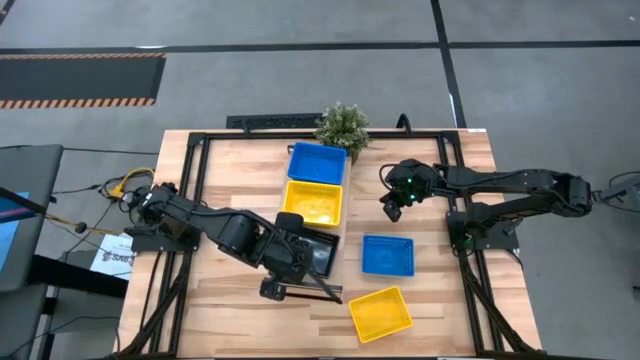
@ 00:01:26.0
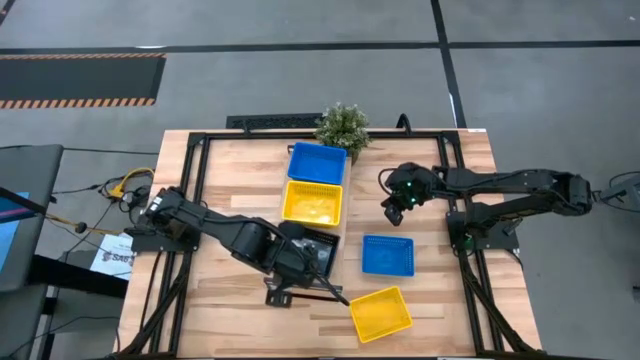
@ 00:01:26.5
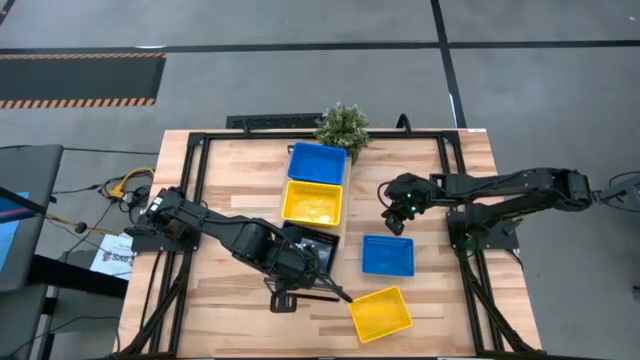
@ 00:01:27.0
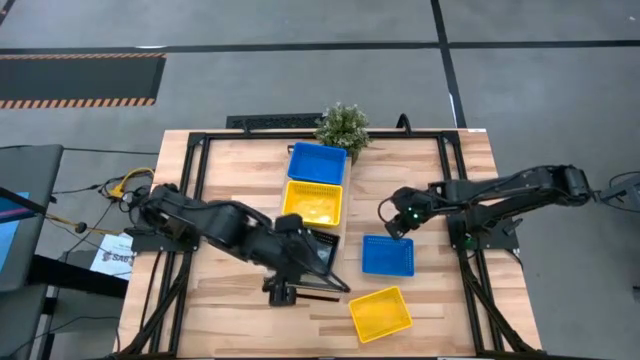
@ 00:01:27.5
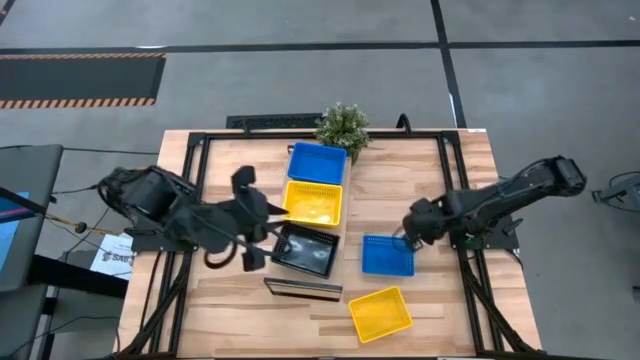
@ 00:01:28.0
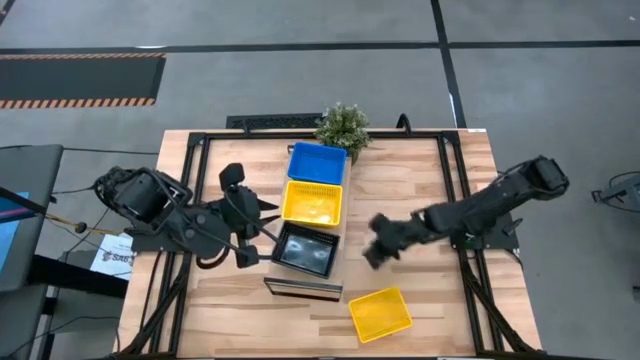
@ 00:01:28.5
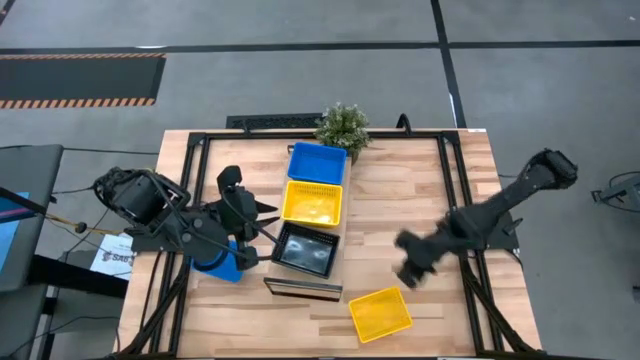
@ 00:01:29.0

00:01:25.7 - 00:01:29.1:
Task: Stack baskets on shelf by color
Move the blue basket to the left side of the table

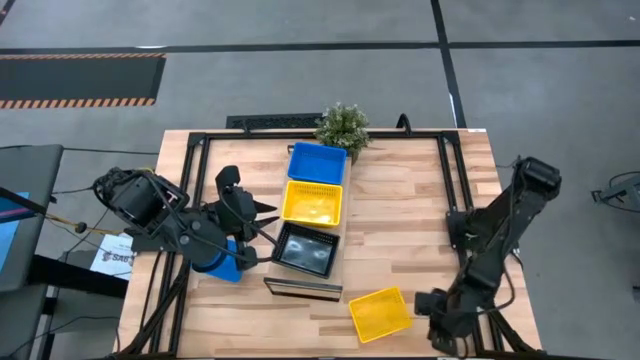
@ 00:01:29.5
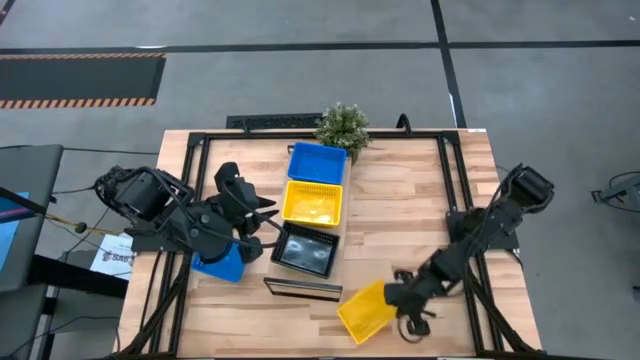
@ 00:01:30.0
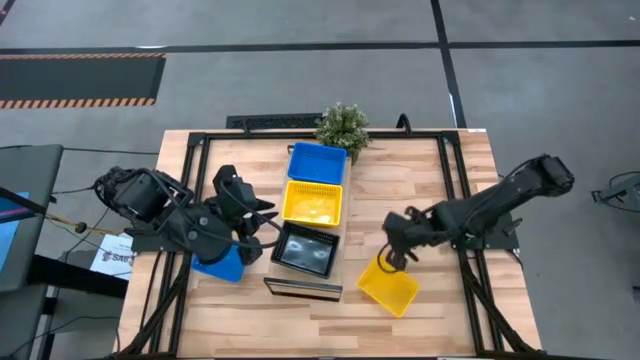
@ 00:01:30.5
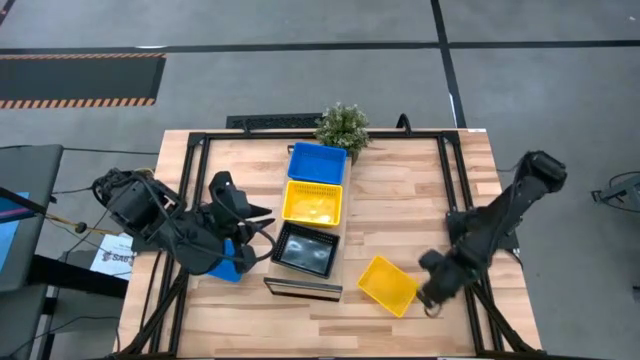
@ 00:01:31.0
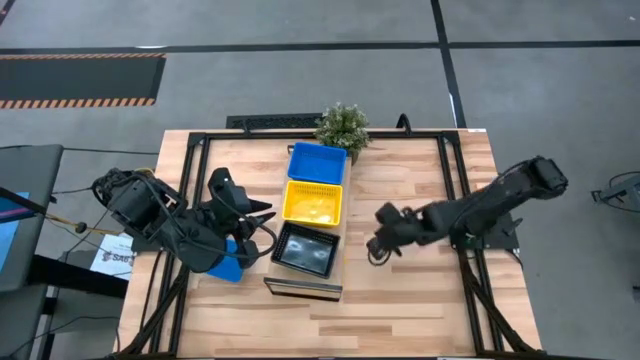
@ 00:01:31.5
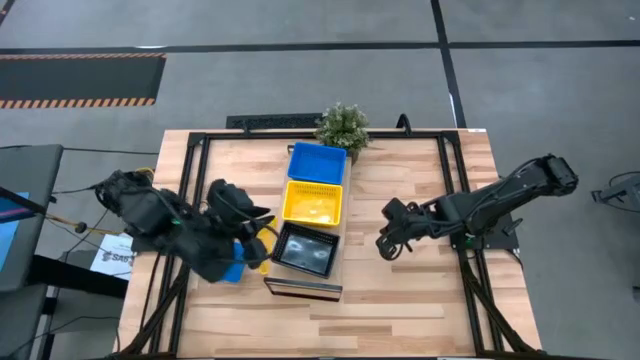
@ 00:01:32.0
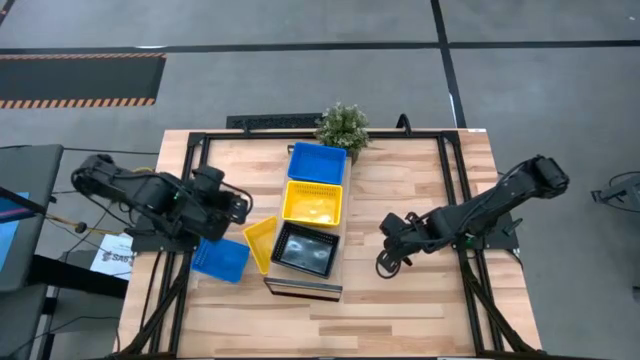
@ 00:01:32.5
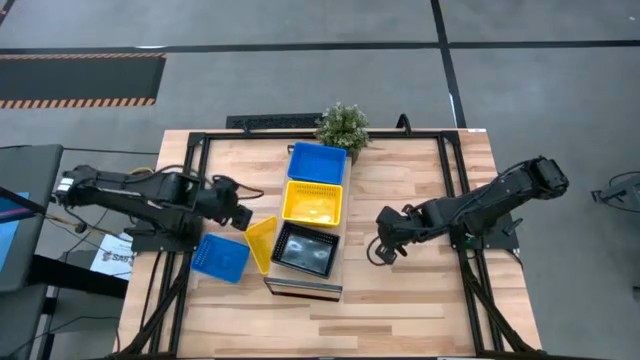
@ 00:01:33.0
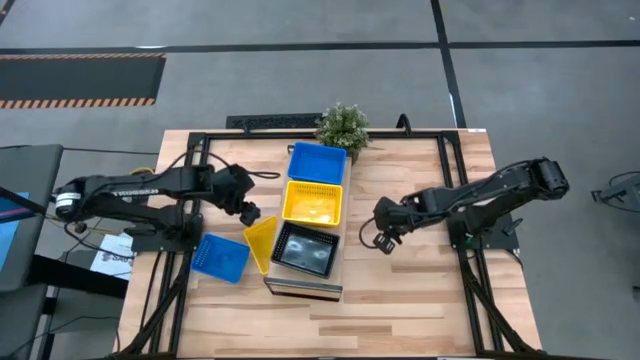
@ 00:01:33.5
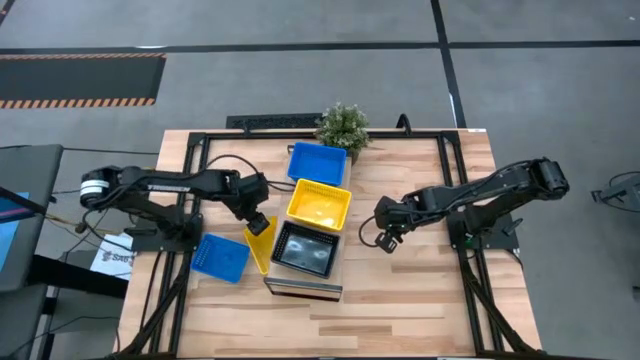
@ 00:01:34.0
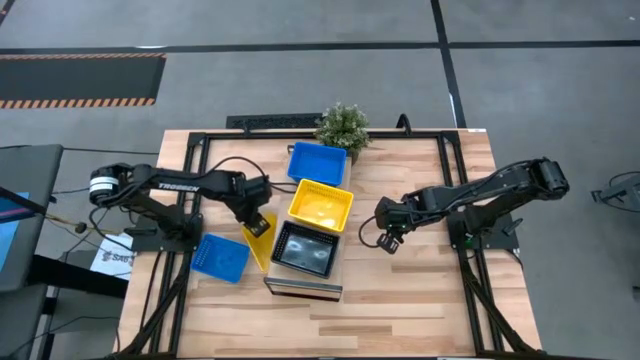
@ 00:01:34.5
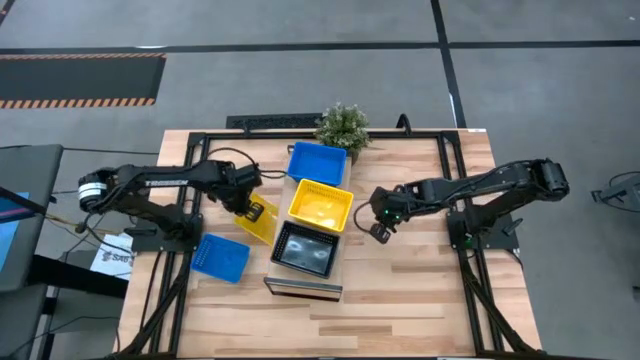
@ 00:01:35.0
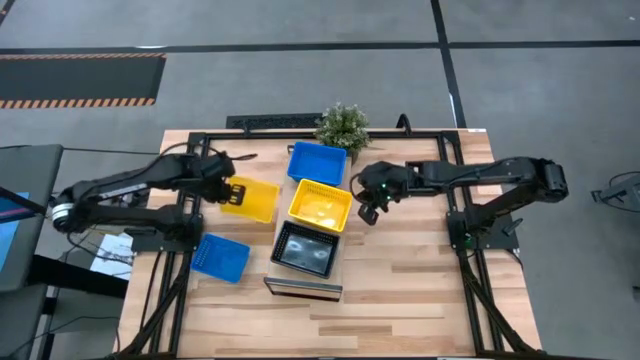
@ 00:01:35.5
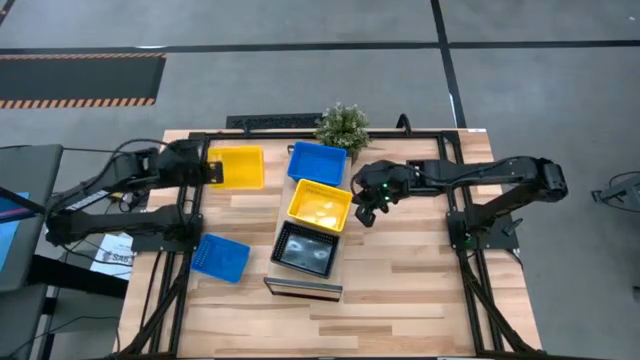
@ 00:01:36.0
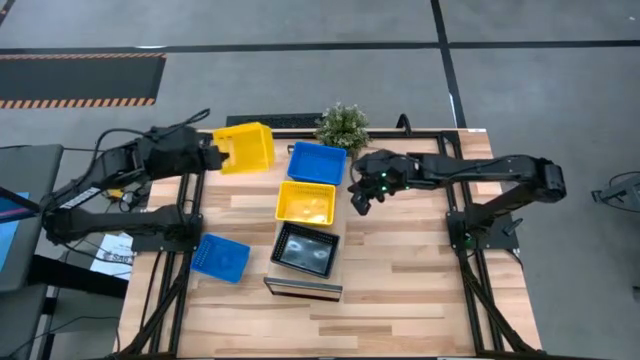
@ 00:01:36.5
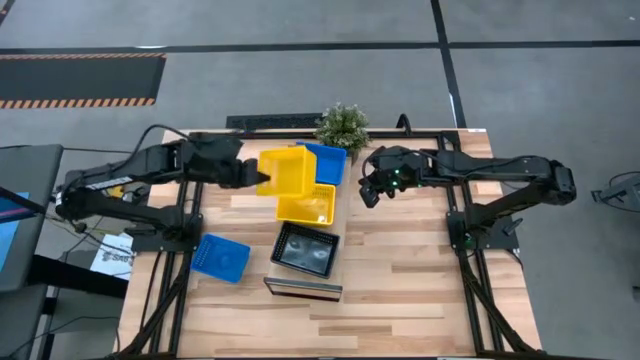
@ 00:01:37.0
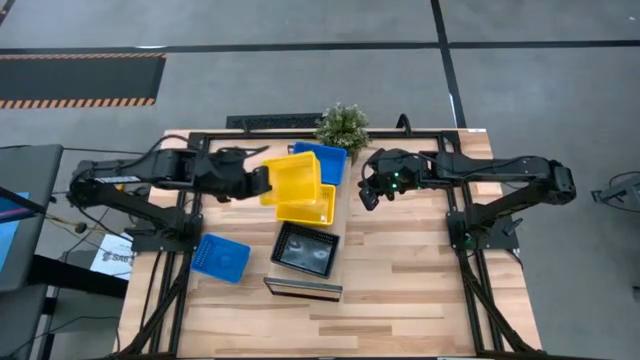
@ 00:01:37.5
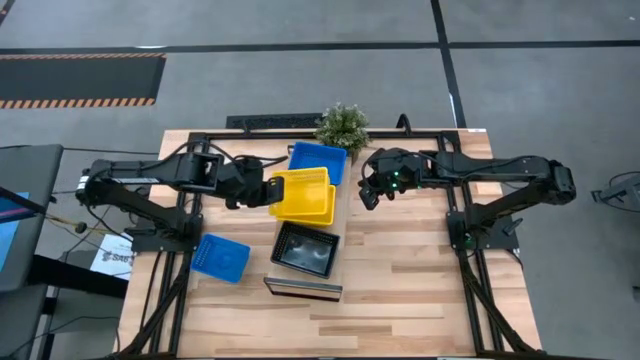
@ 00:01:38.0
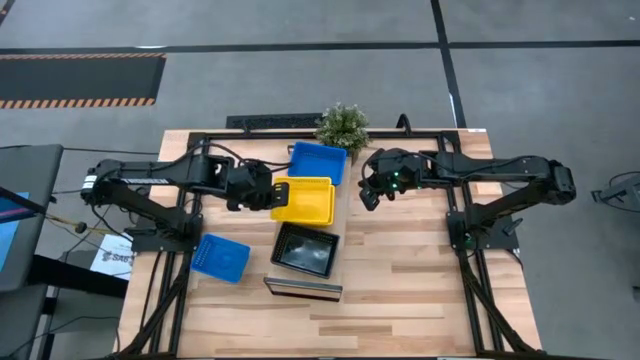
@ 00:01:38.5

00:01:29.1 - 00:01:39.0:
Stack the yellow basket on top of the yellow basket on the shelf

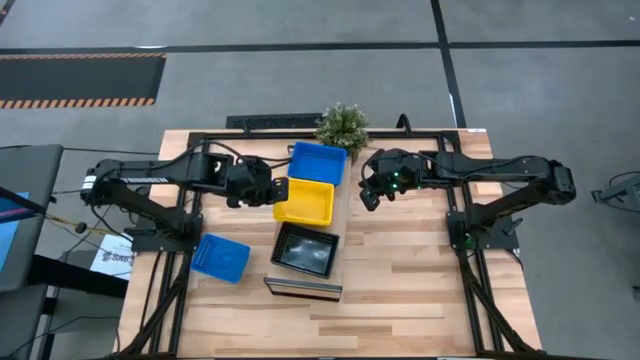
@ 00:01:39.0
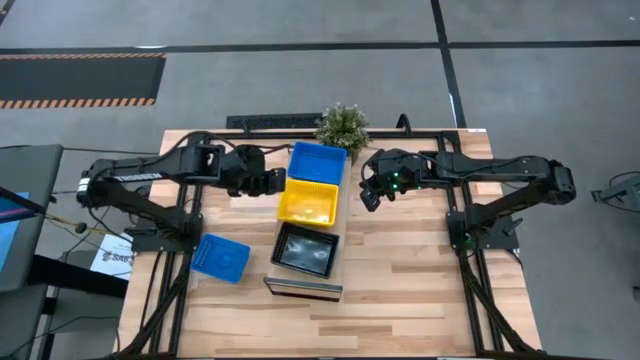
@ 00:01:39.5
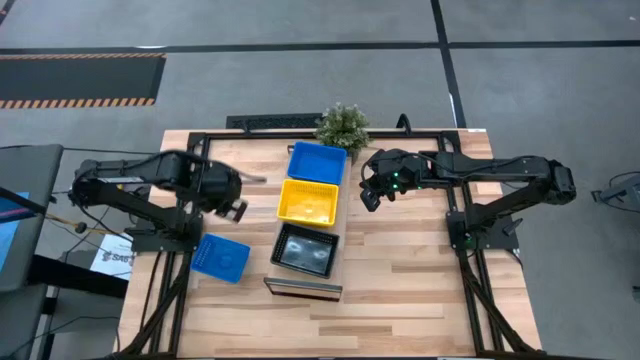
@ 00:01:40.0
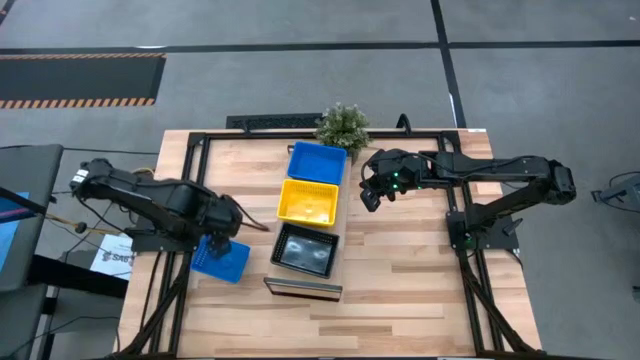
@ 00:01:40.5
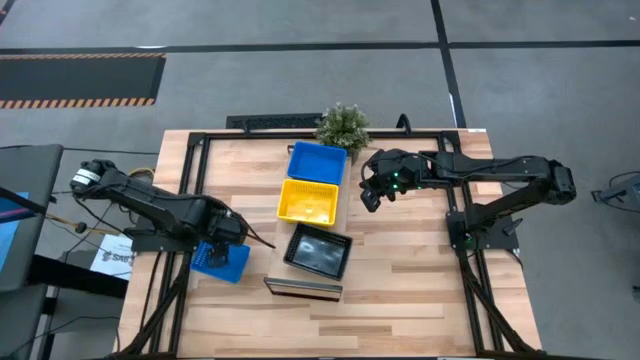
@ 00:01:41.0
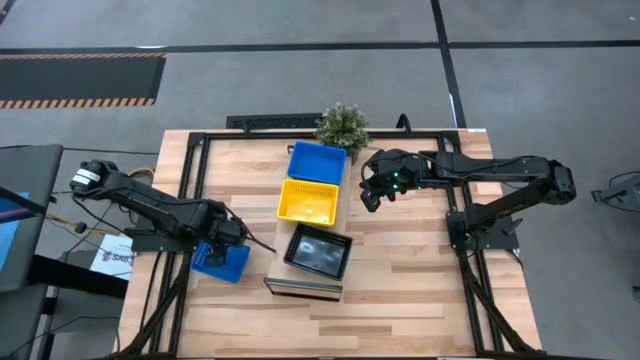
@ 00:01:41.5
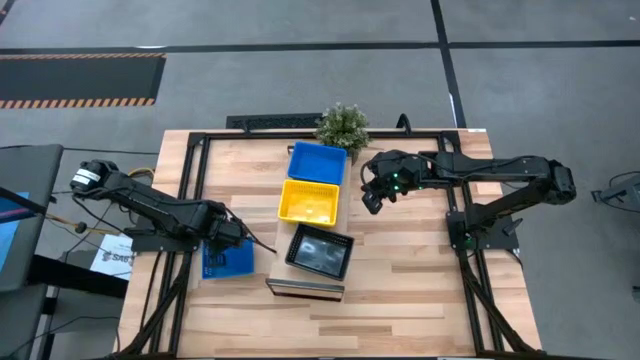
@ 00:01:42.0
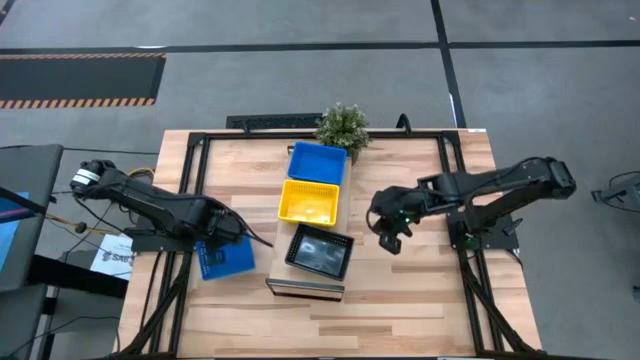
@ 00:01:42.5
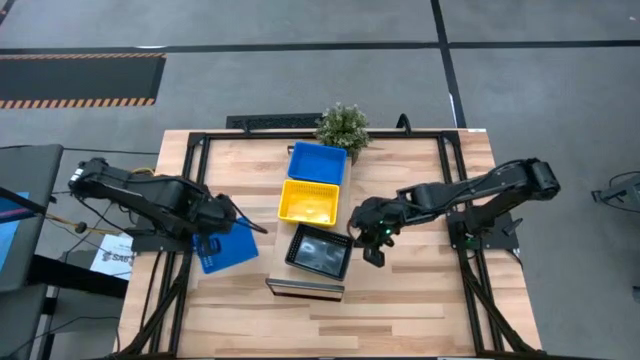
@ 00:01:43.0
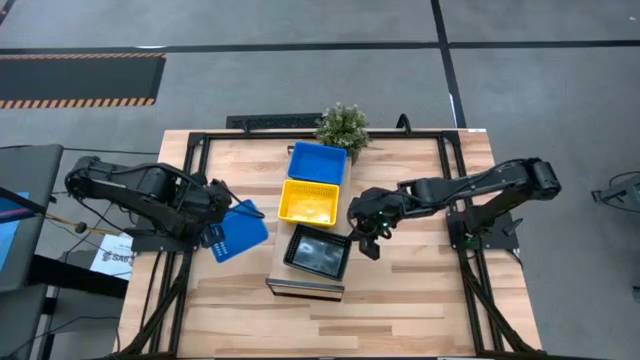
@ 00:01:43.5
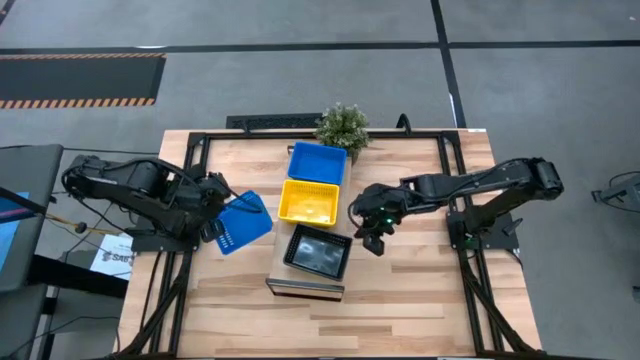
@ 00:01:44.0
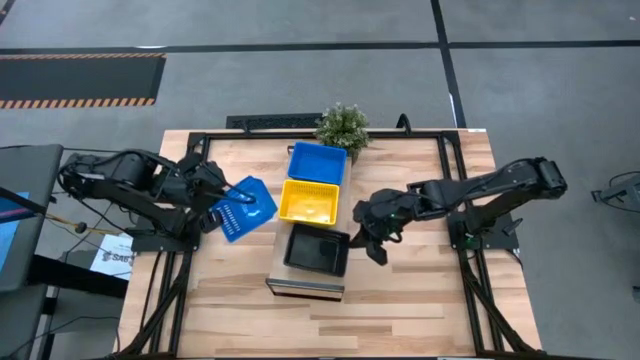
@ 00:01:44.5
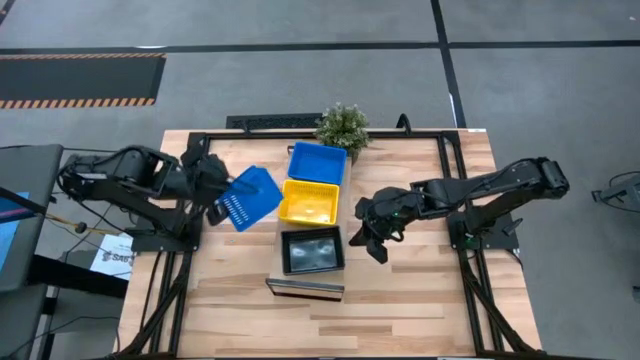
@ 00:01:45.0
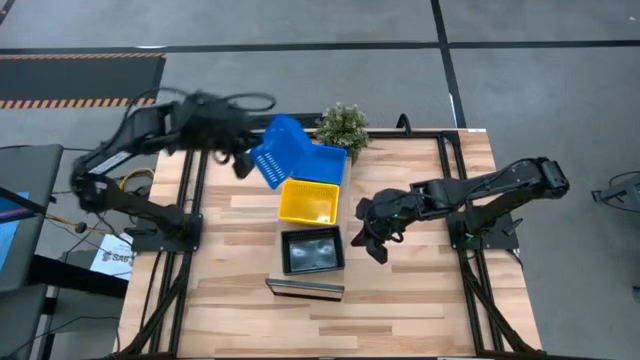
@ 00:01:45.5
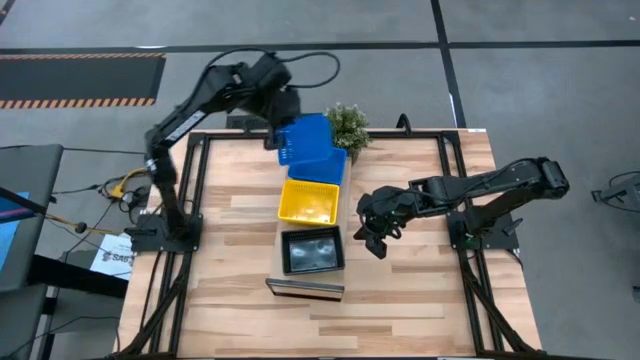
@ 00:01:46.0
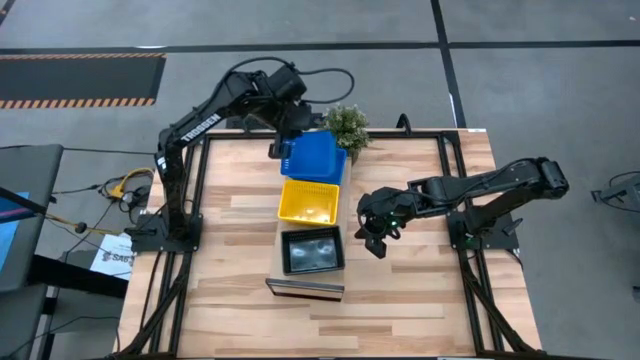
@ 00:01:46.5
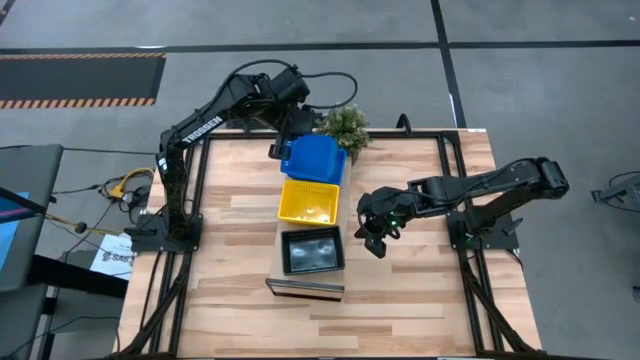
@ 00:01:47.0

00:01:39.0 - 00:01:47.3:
Stack the blue basket on top of the blue basket on the shelf
